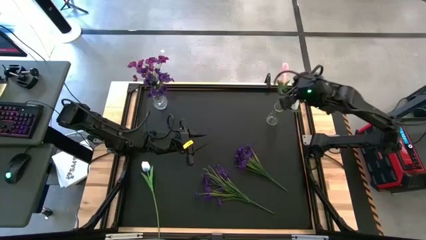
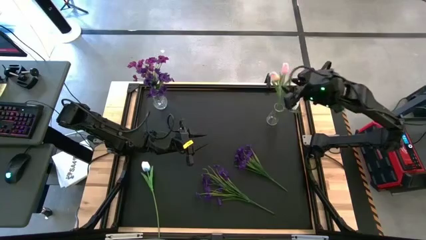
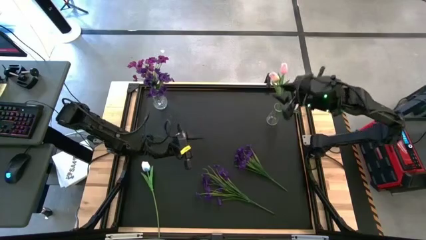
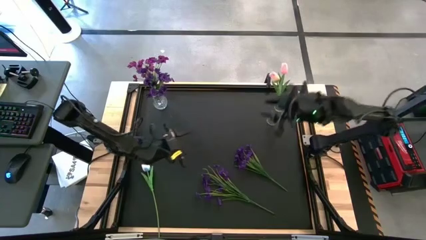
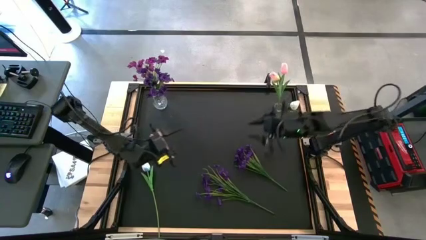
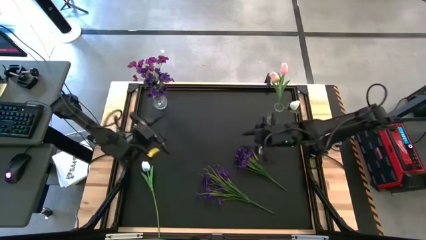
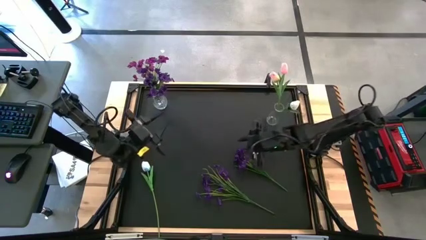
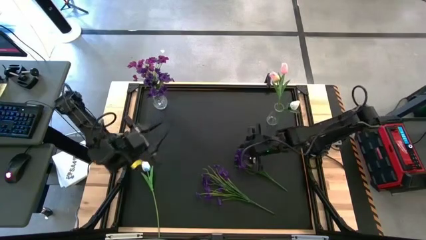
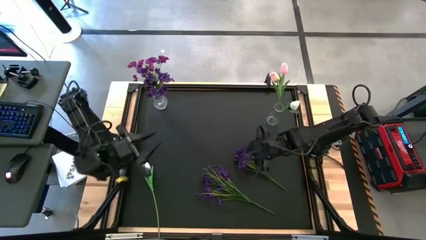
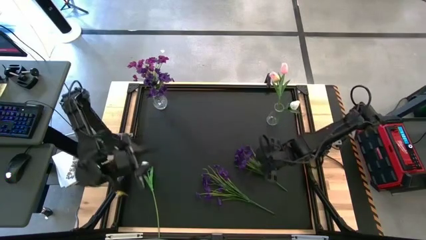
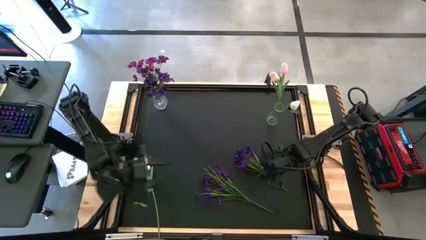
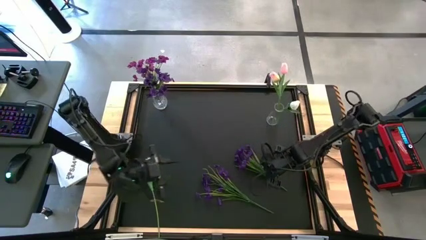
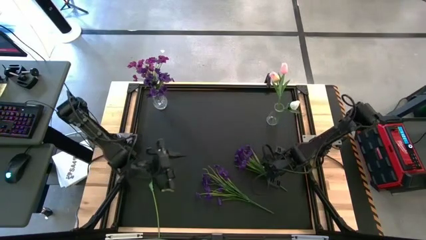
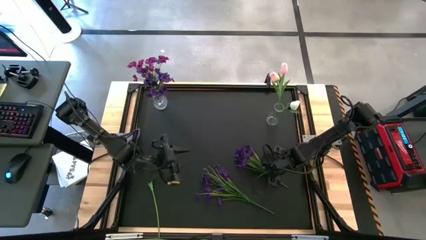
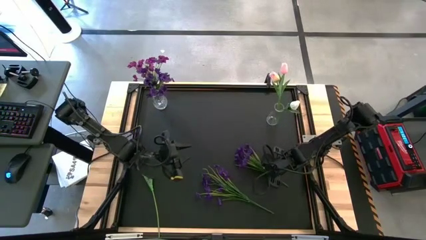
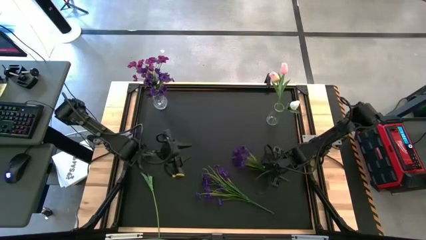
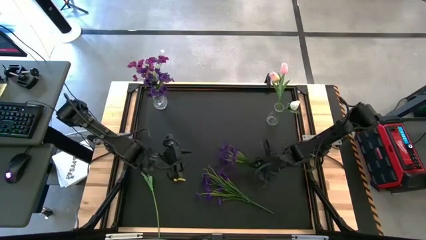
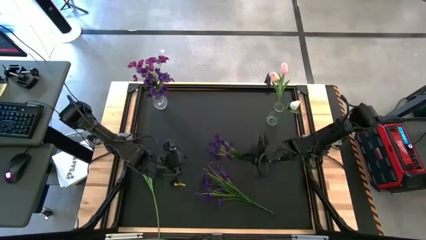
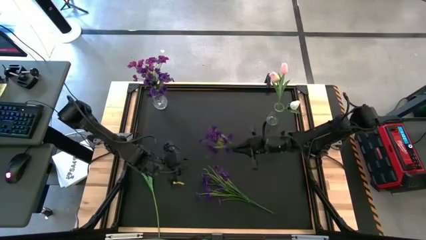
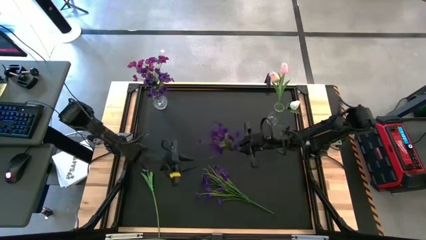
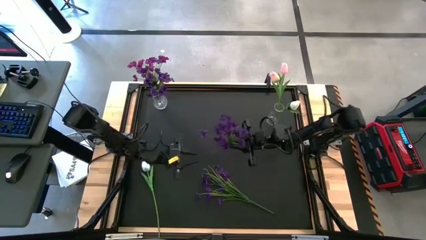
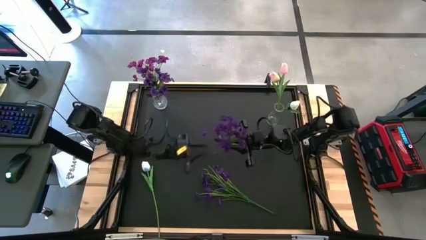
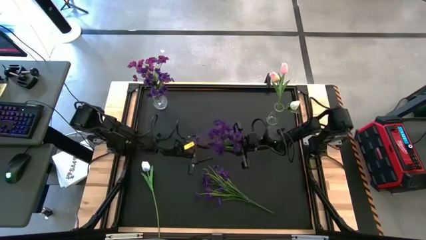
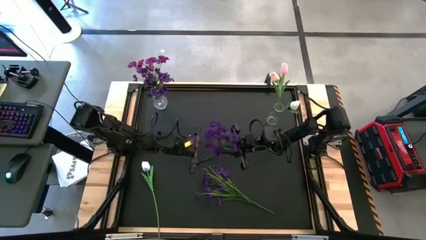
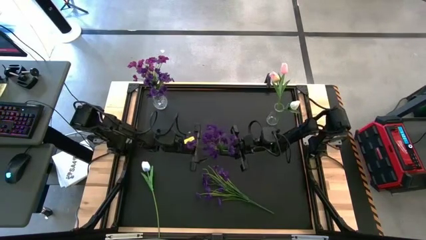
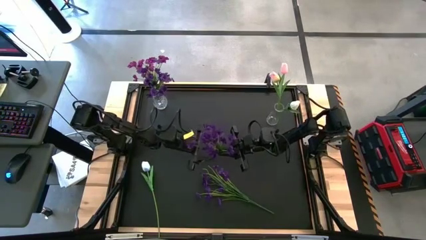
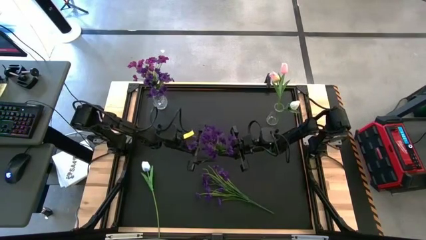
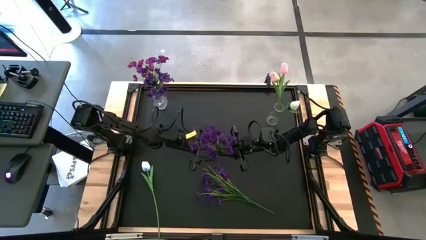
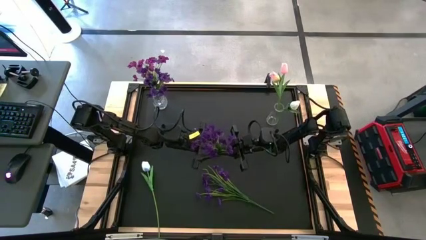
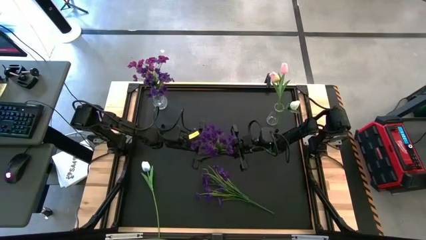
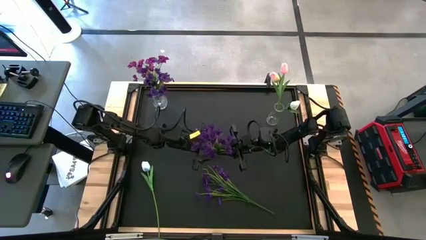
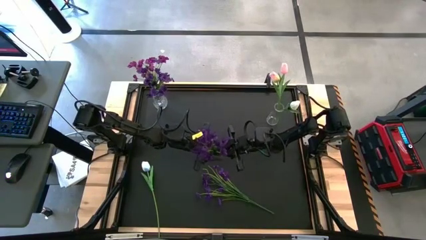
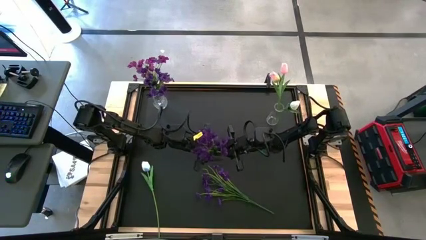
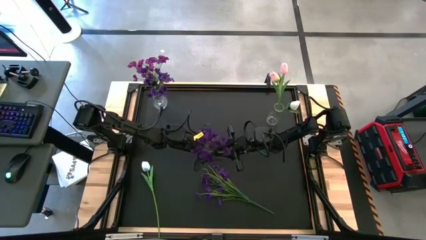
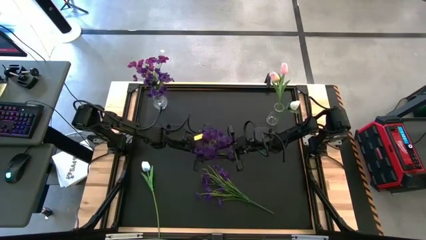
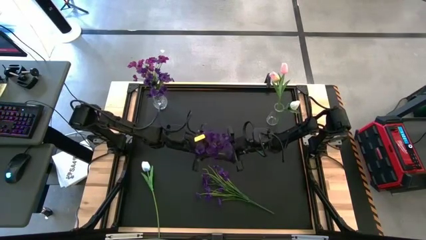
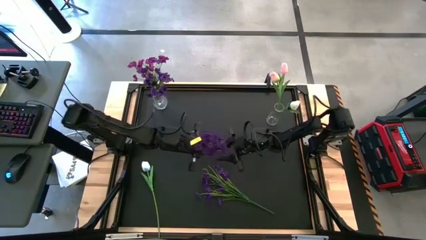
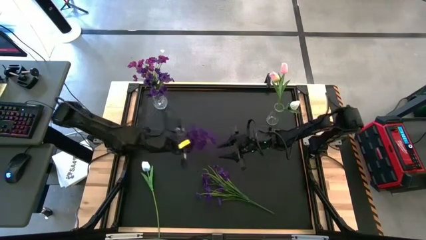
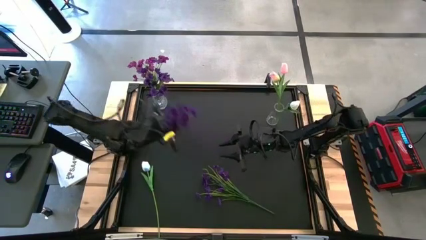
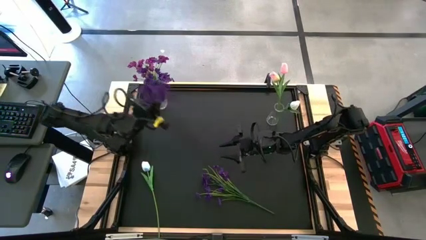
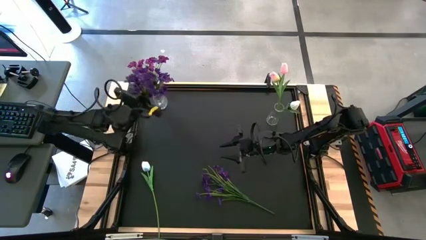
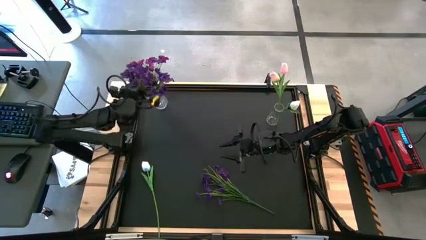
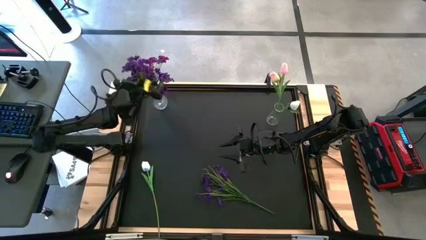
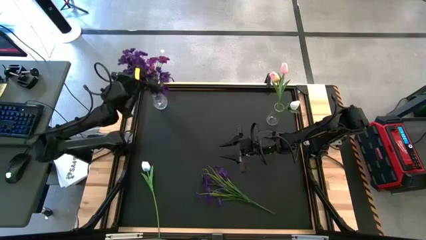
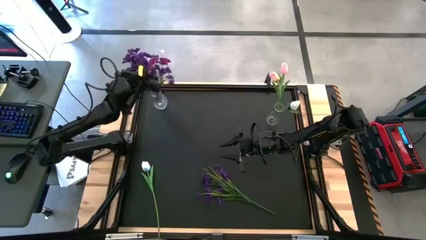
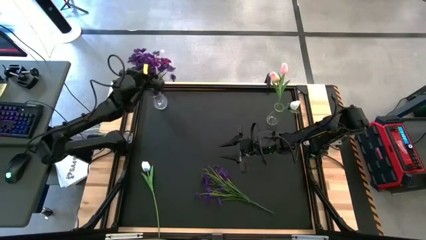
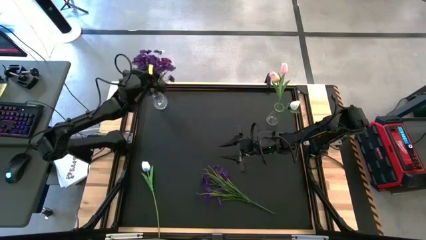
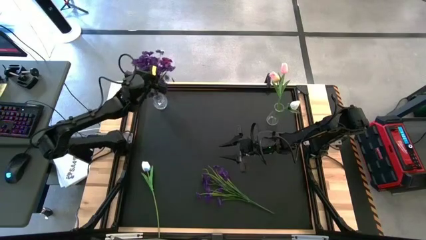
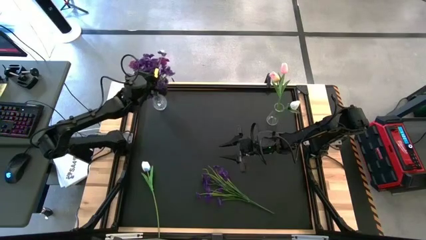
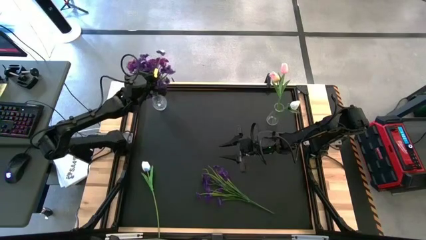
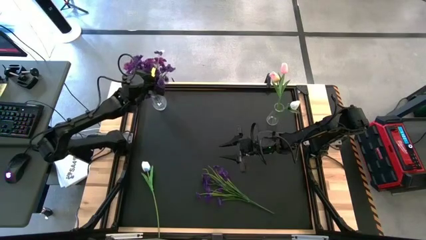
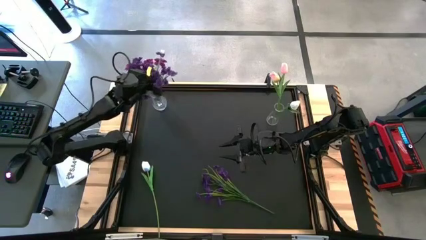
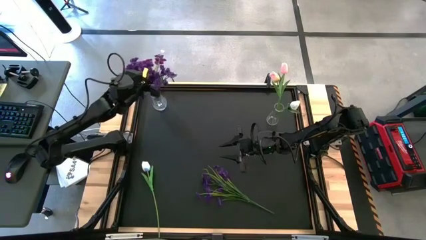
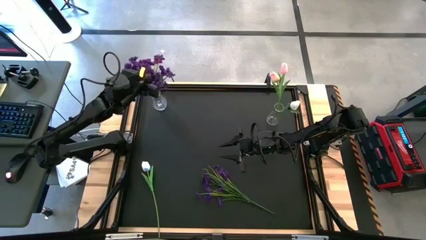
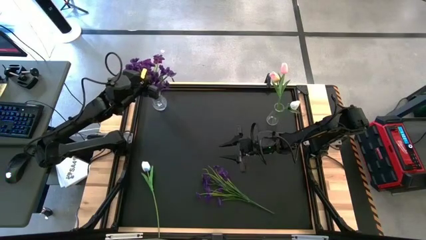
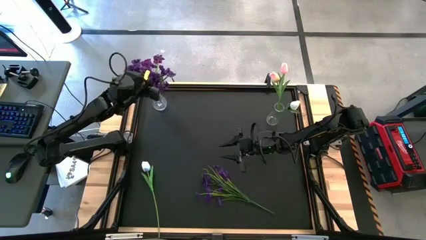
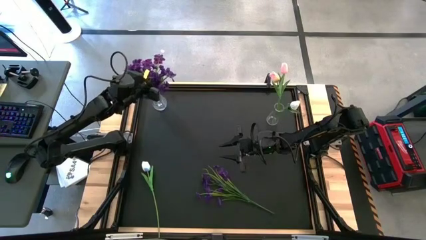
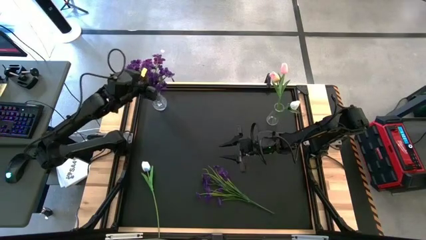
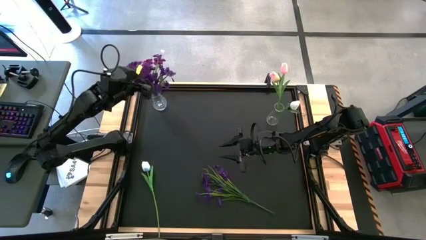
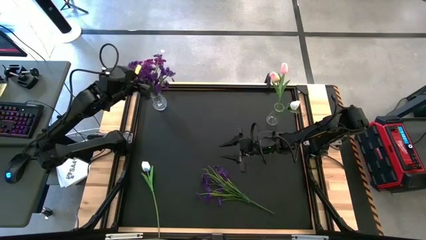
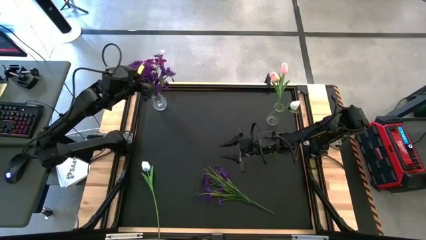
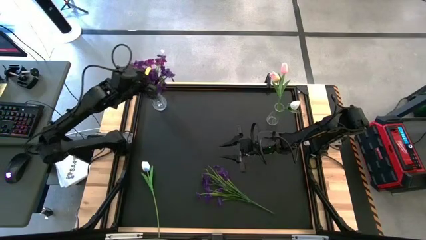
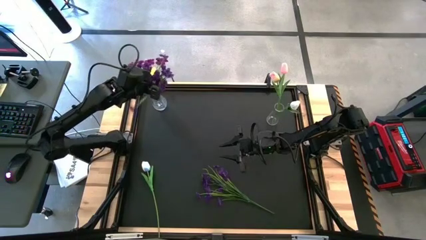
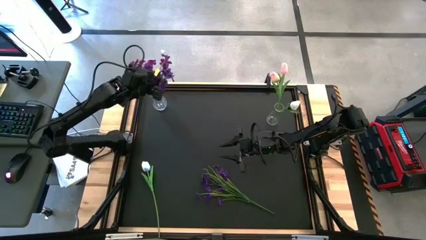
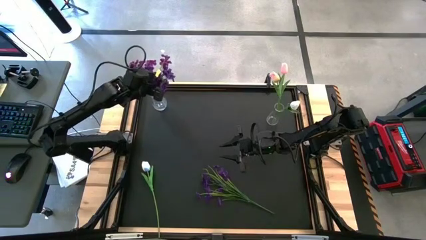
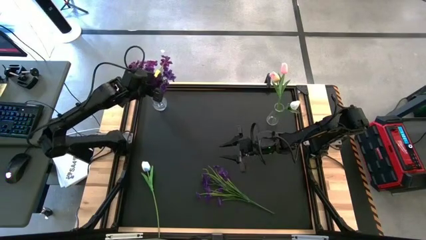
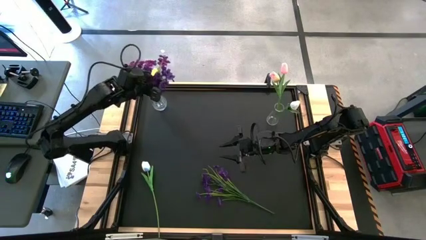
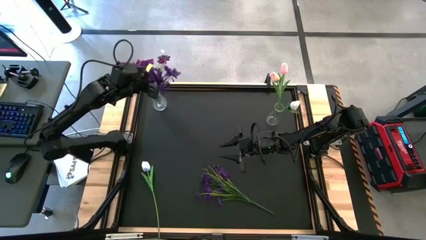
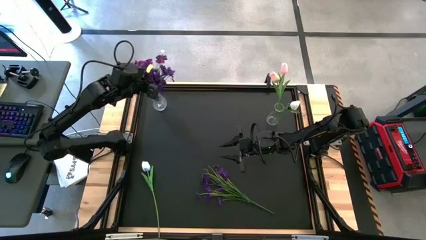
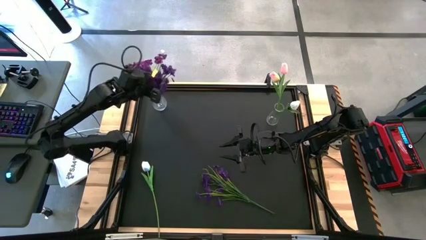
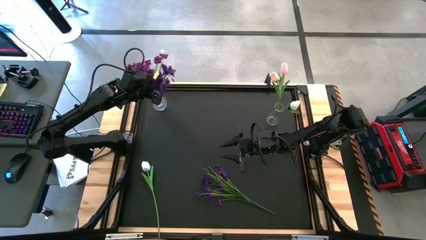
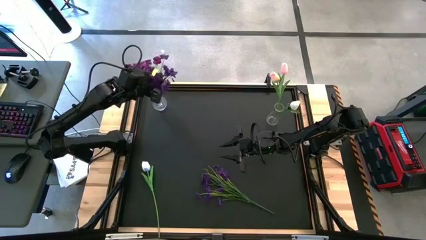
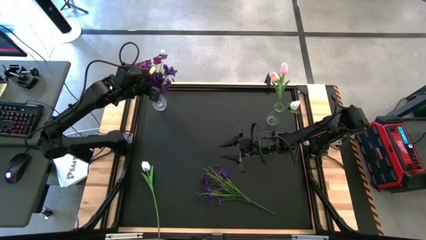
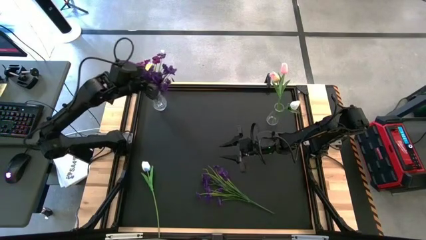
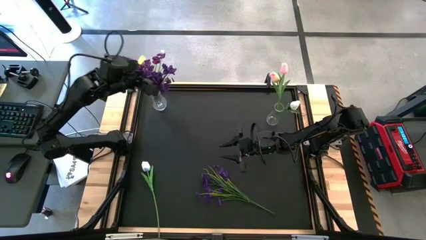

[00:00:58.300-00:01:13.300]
Task: Sort flowers into vase by color
Put the top purple flowers into the left transparent vase
